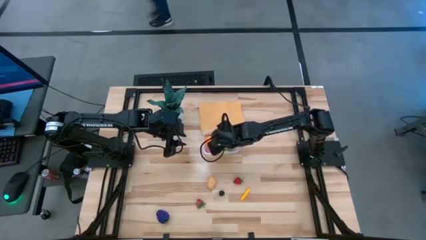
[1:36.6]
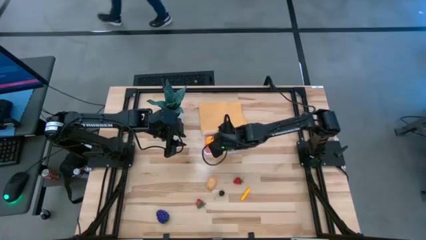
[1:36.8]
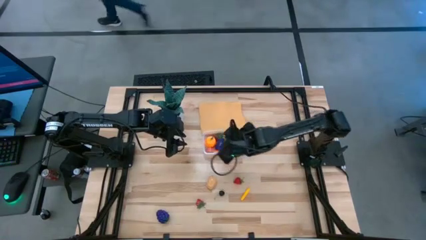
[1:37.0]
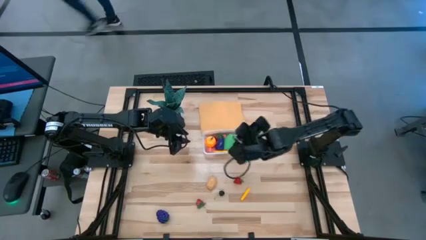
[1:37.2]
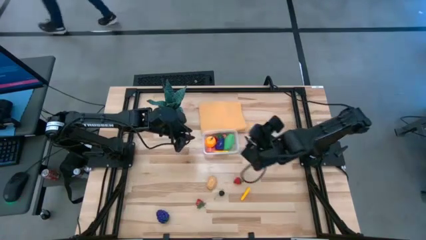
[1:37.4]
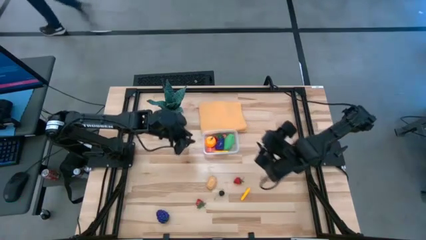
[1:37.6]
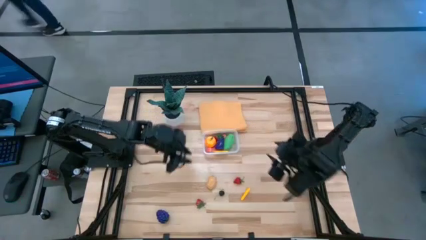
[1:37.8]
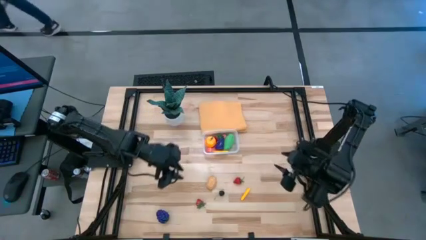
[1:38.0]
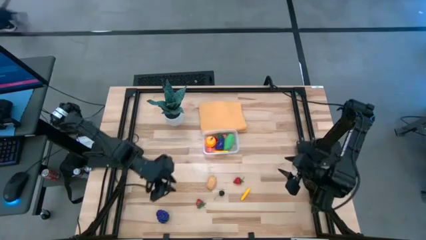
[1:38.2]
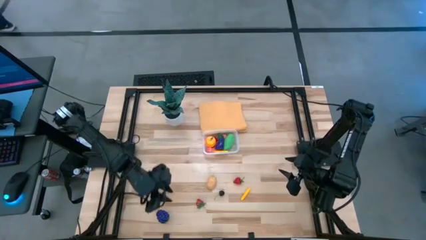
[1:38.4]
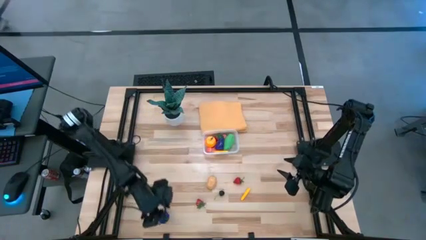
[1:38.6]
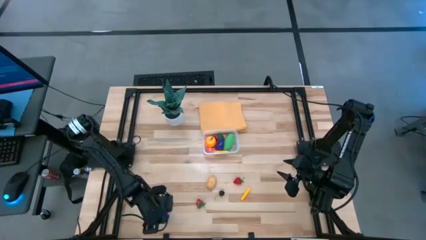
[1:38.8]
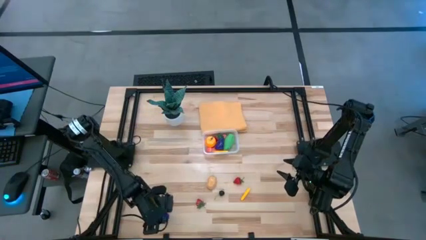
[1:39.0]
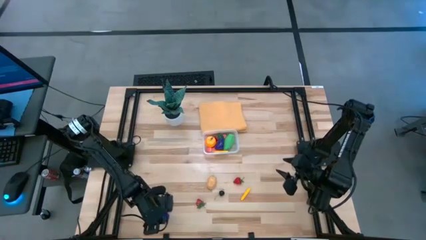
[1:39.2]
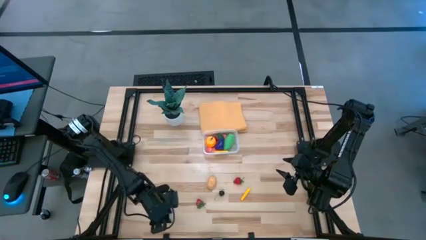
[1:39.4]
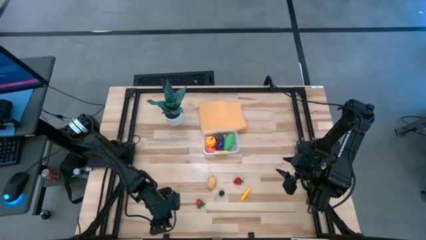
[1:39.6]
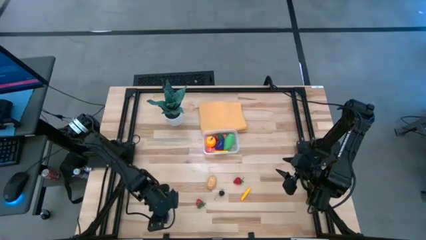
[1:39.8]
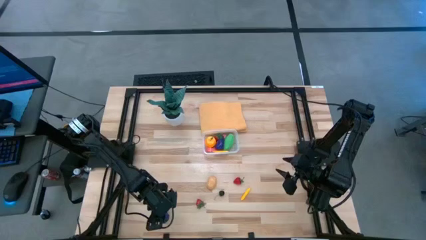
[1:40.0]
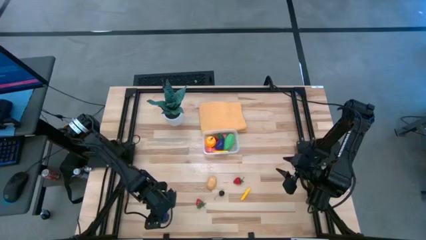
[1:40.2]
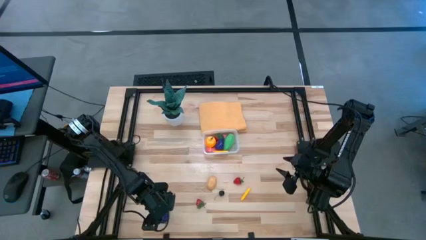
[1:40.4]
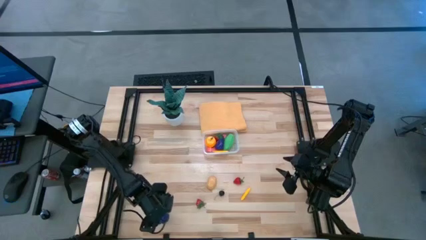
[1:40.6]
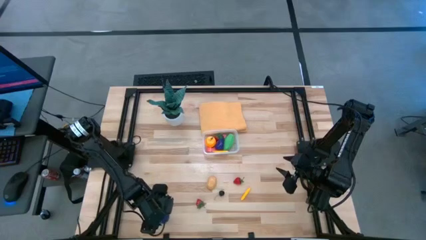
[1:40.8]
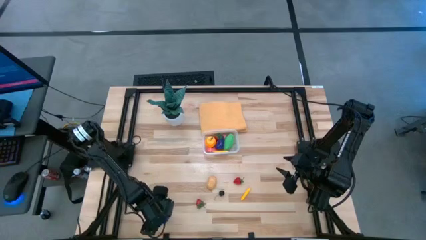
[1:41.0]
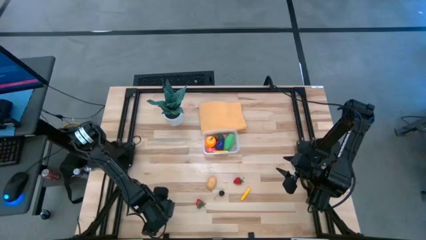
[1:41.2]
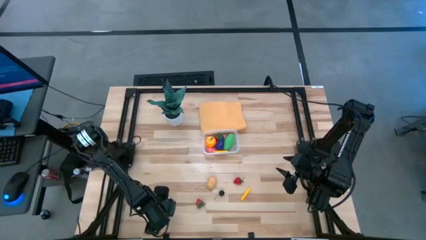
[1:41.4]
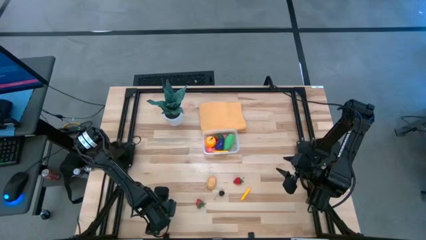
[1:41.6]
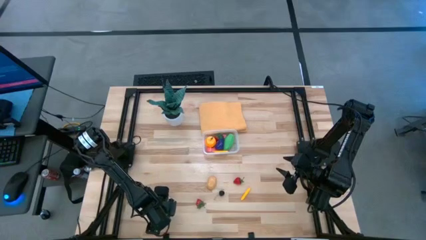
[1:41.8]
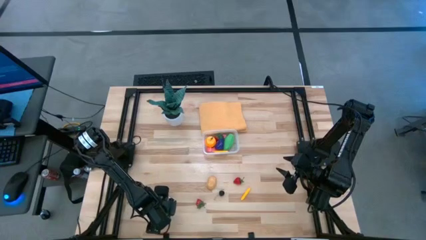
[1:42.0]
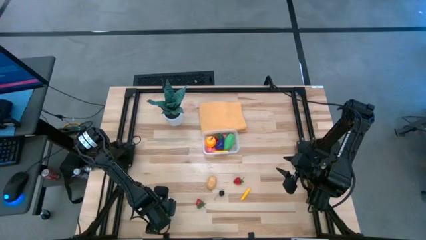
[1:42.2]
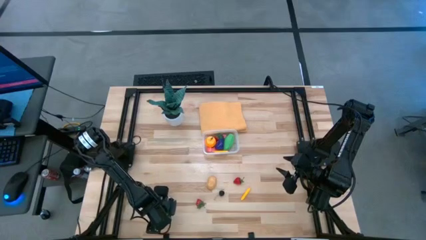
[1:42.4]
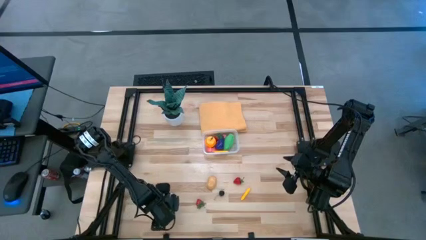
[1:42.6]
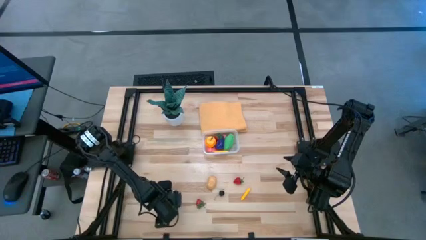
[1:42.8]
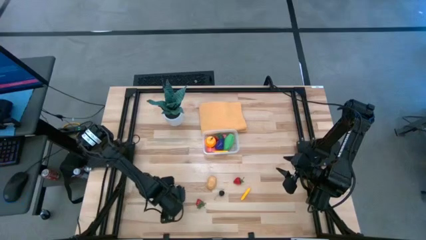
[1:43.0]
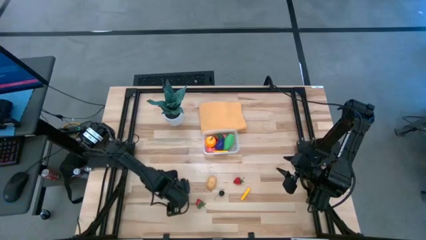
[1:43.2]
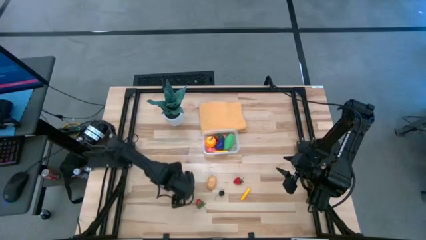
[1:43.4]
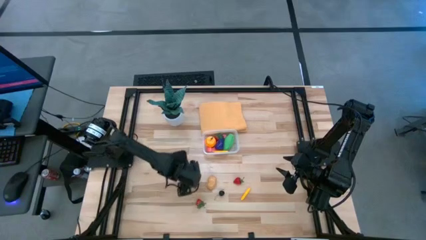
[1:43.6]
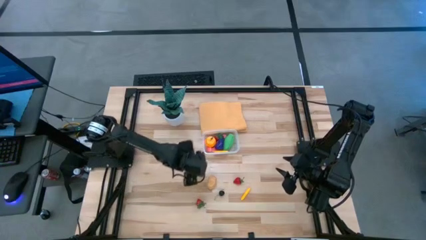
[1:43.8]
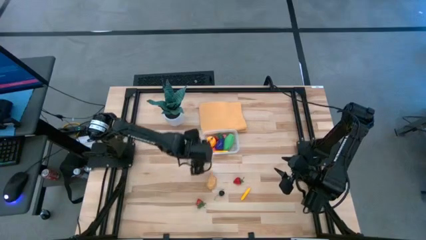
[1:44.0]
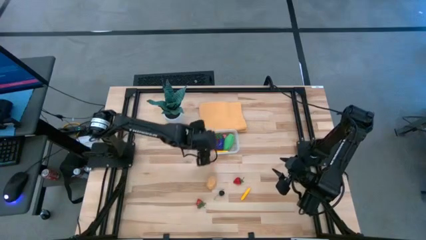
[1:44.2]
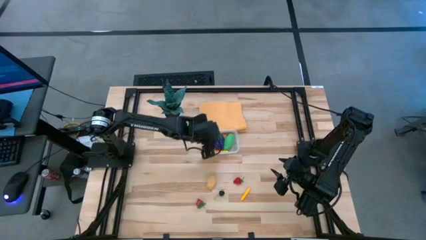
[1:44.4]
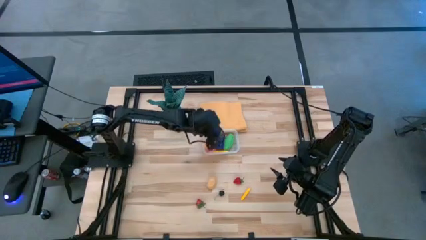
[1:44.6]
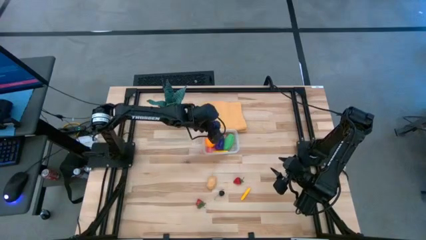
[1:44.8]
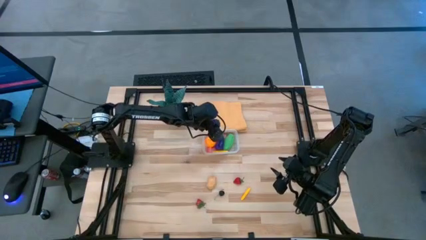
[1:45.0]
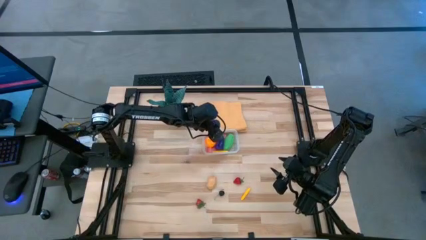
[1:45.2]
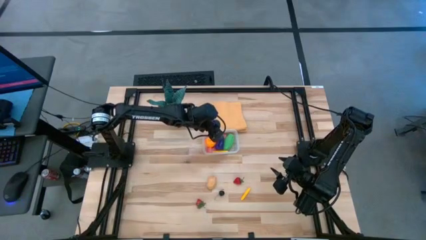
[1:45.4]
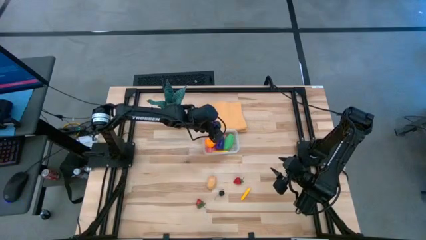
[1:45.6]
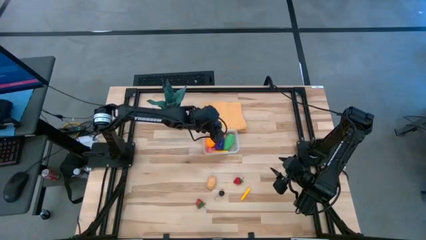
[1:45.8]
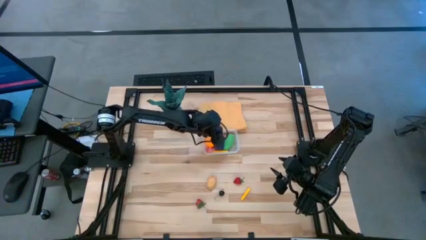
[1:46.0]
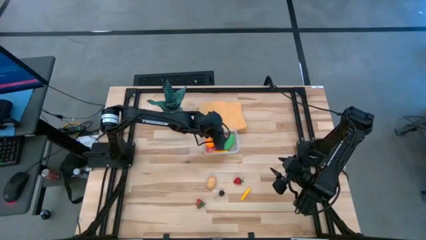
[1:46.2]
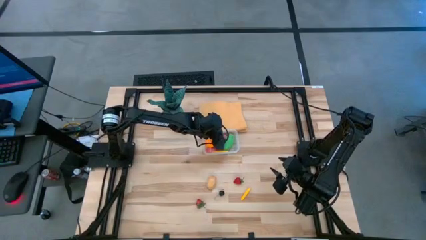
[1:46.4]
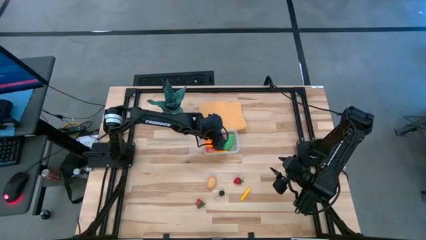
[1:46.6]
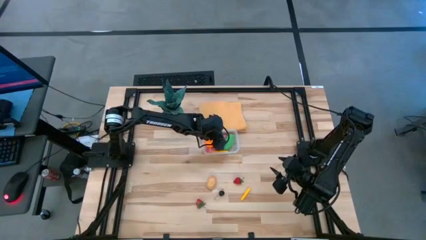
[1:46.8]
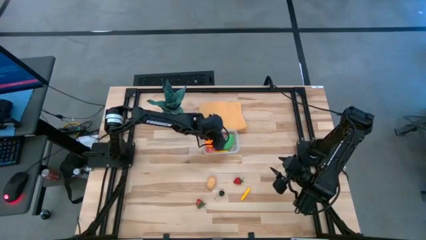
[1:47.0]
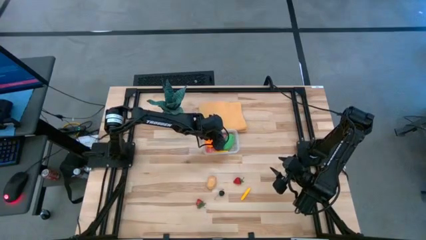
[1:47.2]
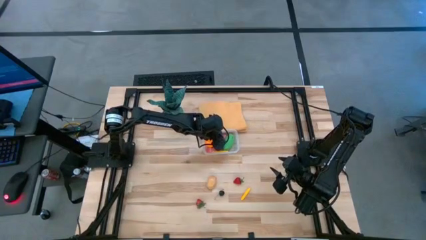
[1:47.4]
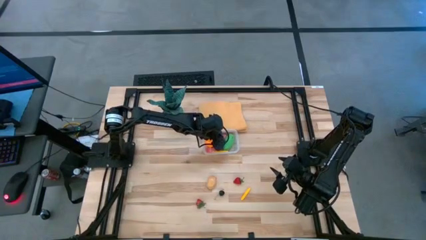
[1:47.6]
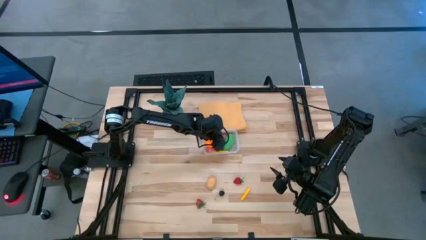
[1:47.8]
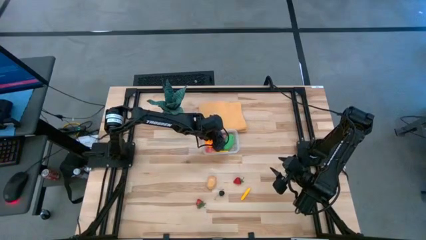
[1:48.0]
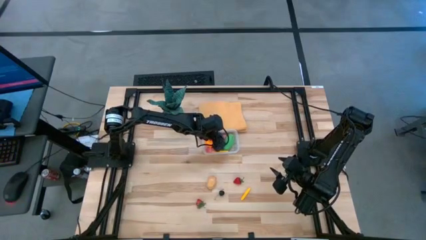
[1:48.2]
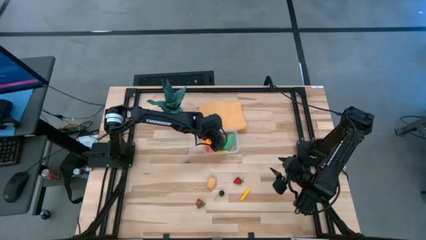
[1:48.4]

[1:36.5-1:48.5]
Task: Pick and placing Produce into tupperware
Put the blue blackberry into the transparent bin

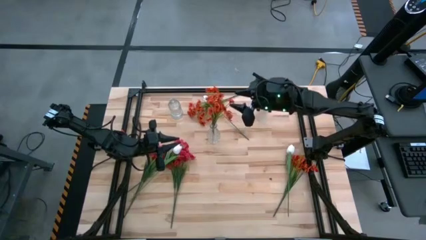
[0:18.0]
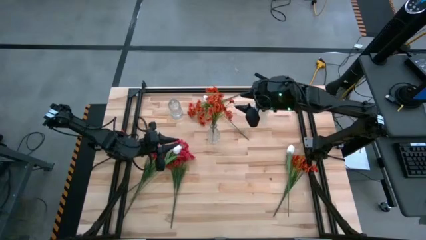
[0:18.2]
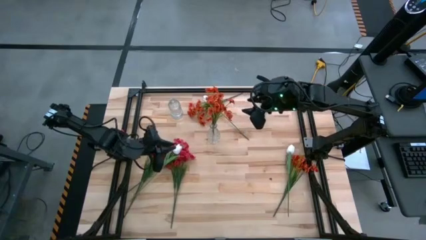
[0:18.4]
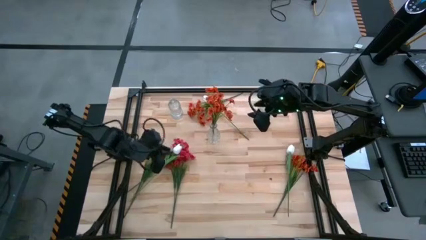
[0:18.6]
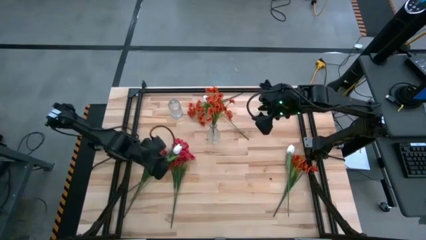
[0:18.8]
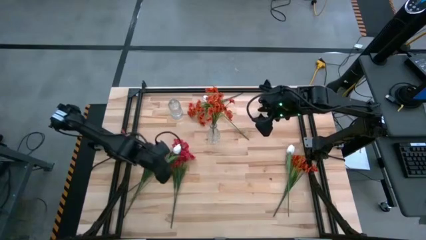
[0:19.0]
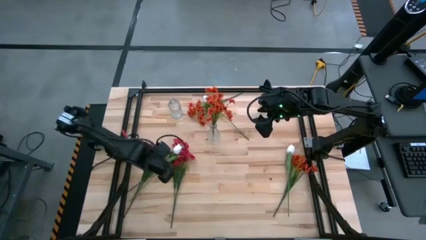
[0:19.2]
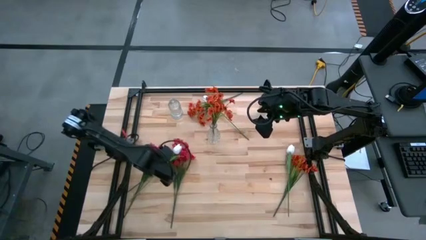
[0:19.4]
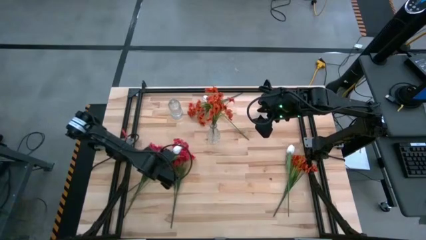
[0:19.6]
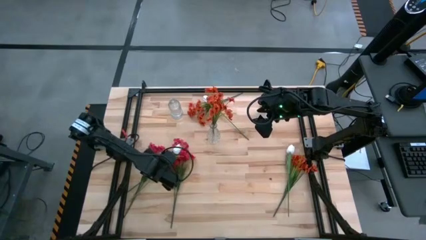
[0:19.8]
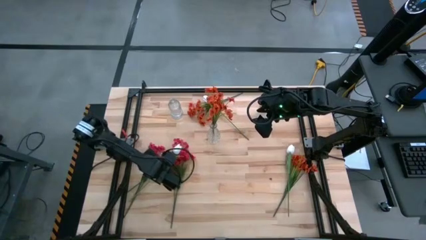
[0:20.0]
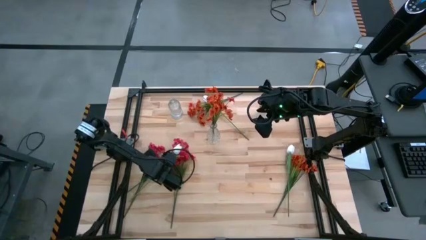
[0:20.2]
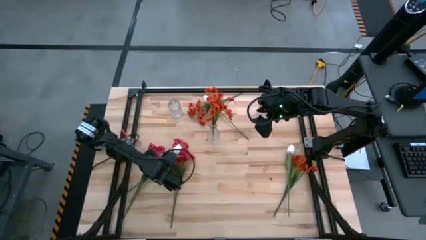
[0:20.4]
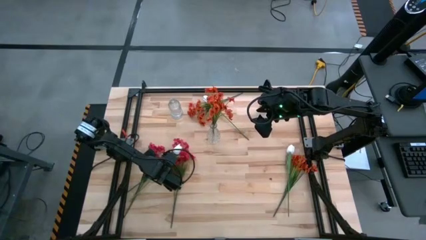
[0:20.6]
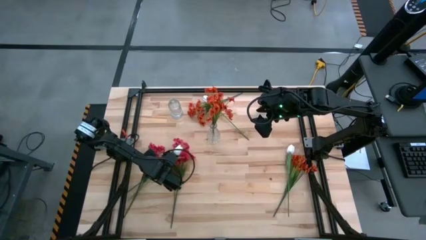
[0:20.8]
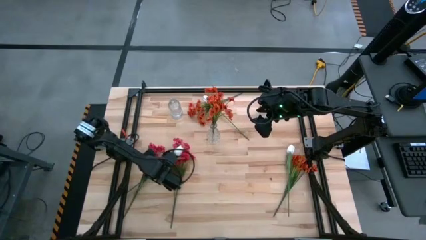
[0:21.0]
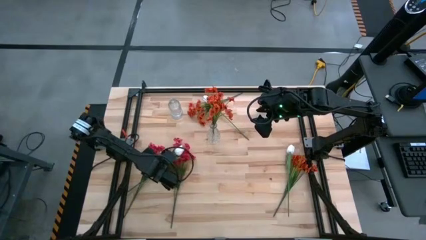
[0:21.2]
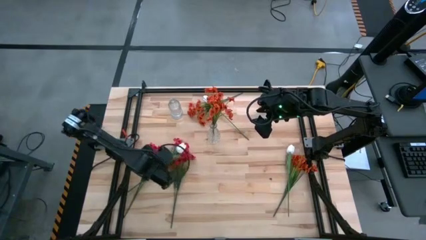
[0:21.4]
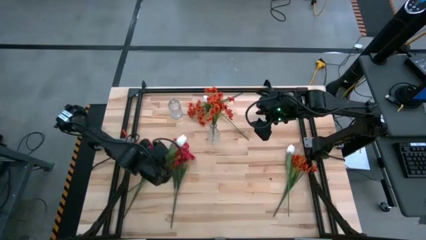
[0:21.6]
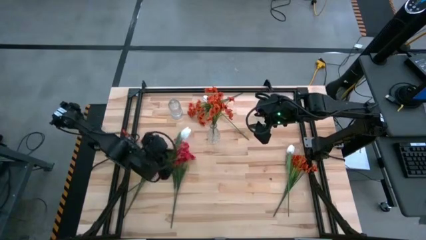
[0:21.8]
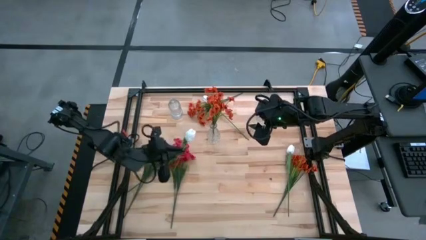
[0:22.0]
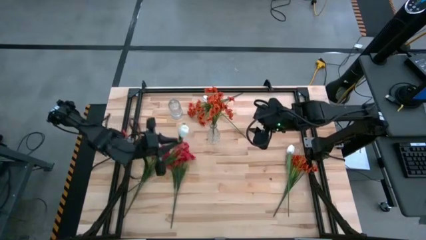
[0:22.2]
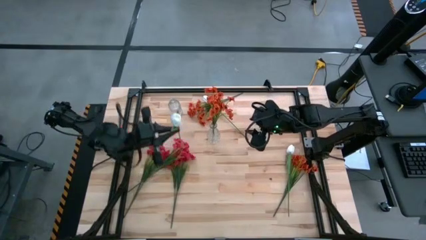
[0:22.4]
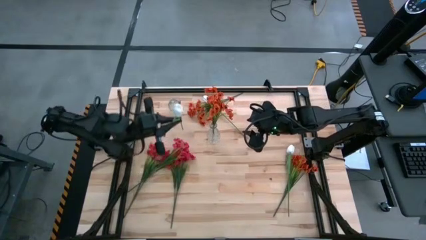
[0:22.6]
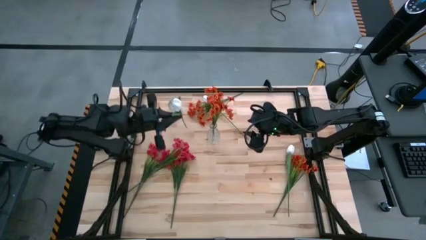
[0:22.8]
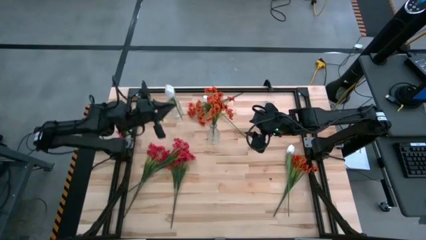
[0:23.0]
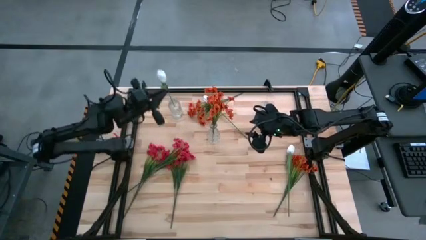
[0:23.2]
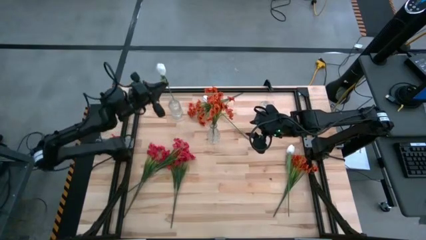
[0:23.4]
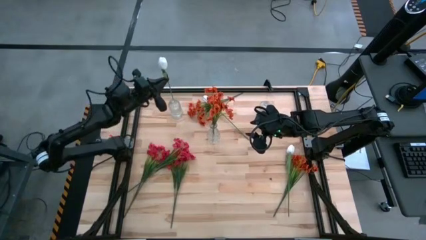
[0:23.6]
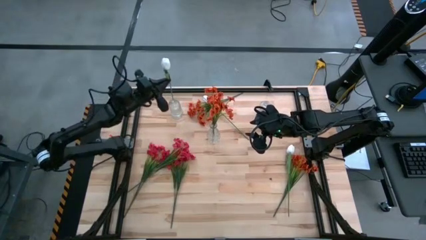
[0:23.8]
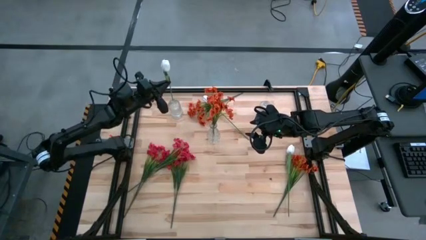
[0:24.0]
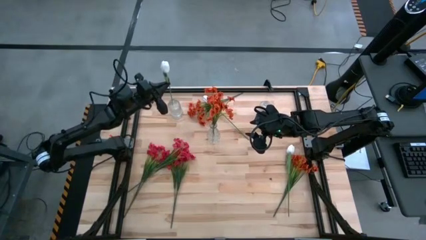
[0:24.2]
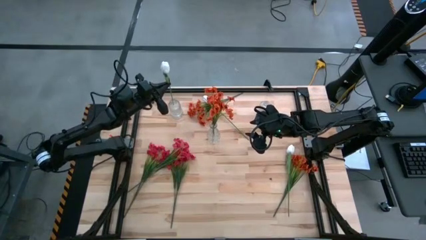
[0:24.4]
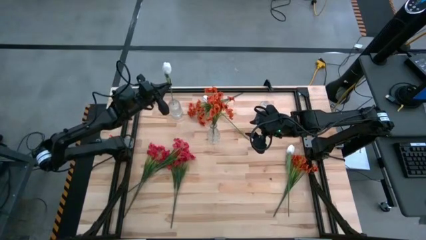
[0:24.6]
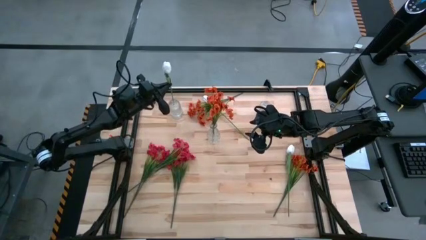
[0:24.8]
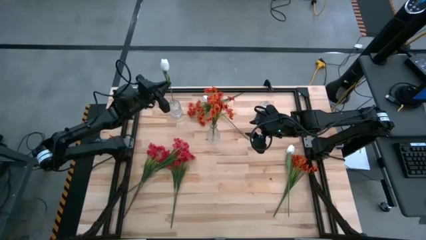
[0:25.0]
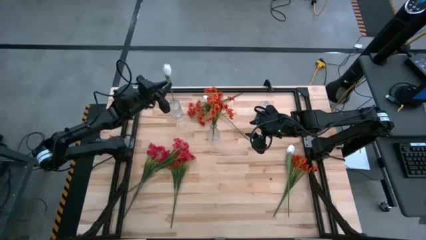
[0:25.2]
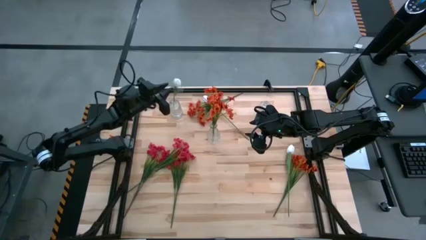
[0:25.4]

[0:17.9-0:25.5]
Task: Sort flowers into vase by color
Put the bottom left white tulip into the top left transparent vase
